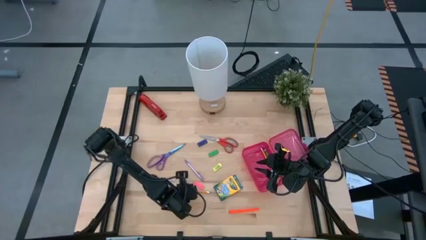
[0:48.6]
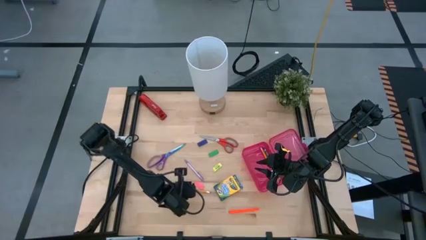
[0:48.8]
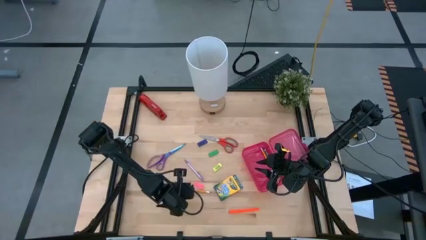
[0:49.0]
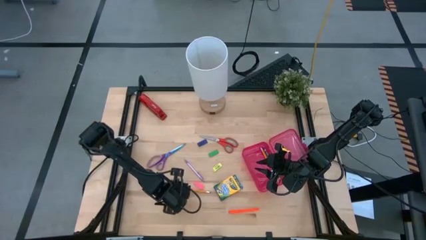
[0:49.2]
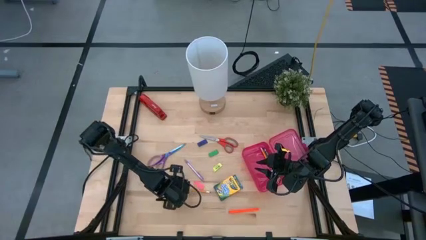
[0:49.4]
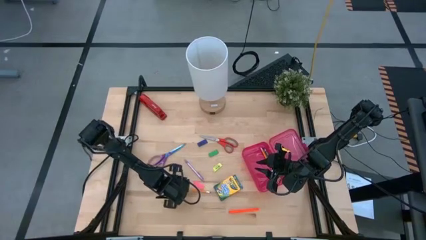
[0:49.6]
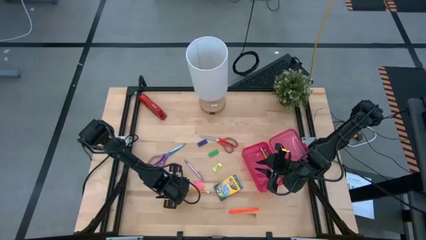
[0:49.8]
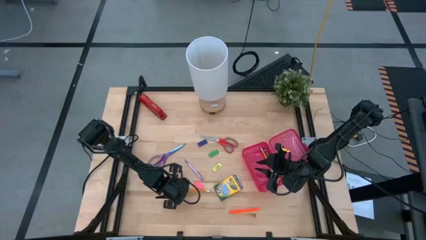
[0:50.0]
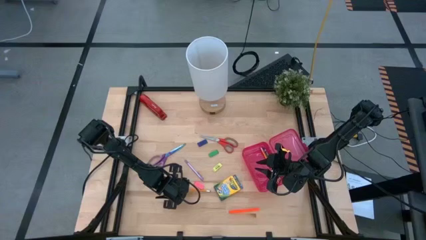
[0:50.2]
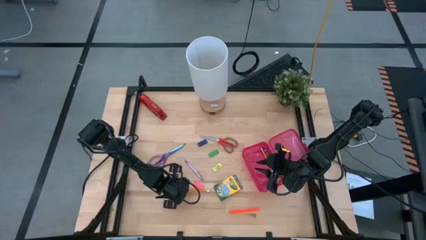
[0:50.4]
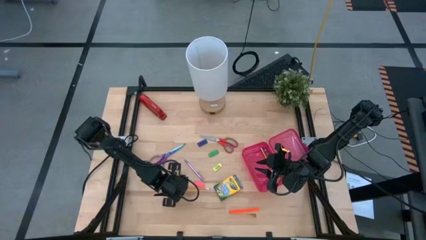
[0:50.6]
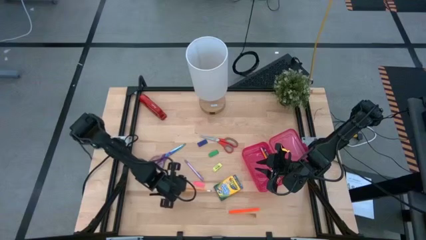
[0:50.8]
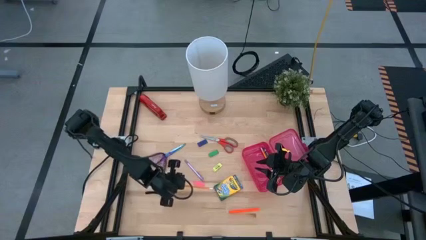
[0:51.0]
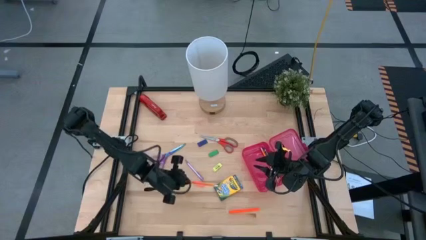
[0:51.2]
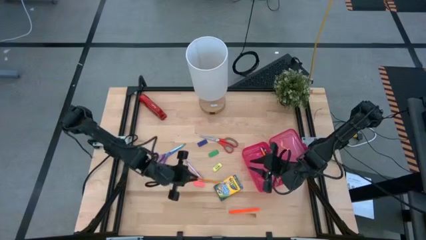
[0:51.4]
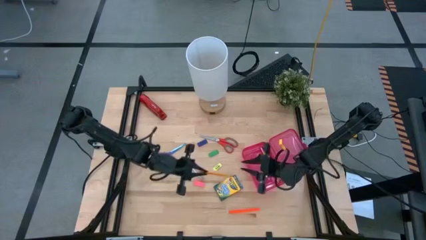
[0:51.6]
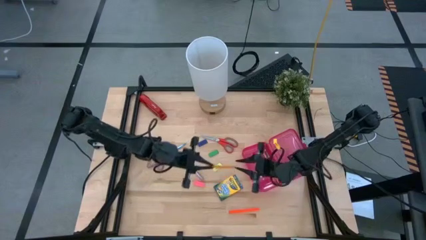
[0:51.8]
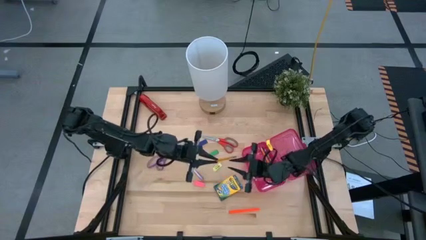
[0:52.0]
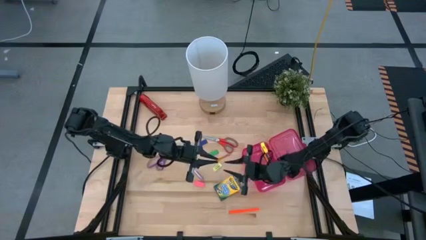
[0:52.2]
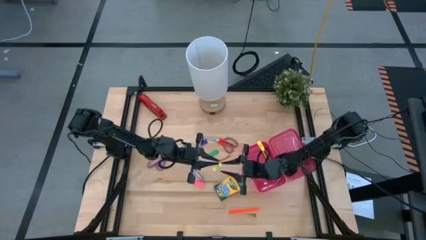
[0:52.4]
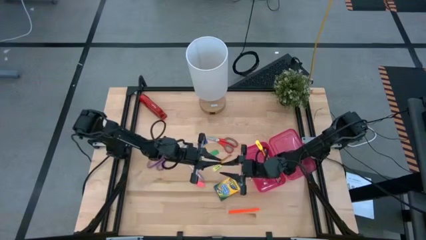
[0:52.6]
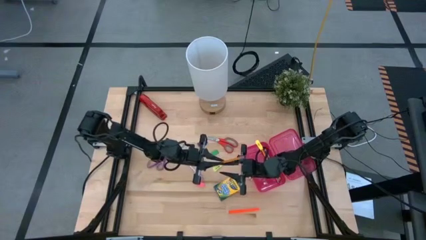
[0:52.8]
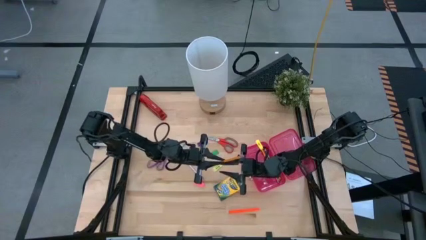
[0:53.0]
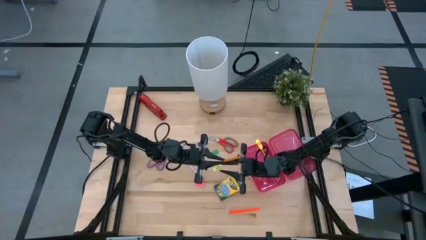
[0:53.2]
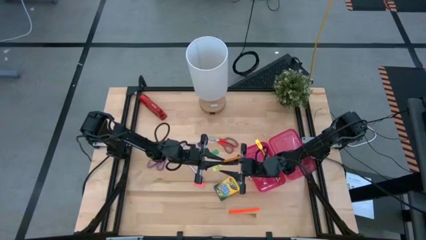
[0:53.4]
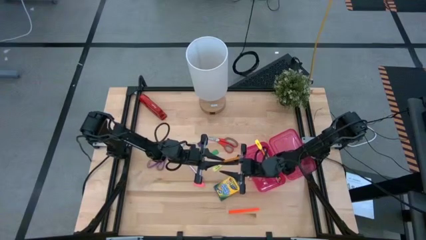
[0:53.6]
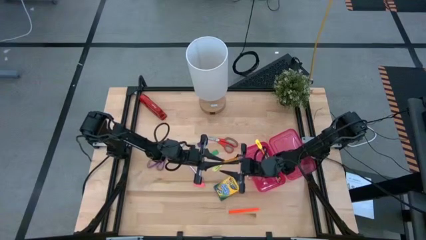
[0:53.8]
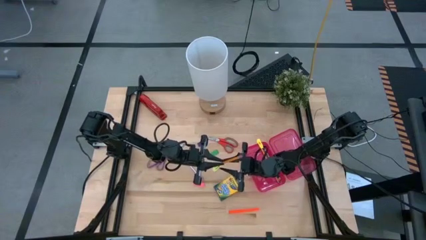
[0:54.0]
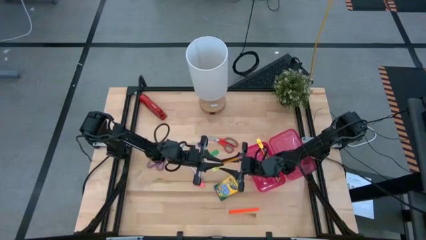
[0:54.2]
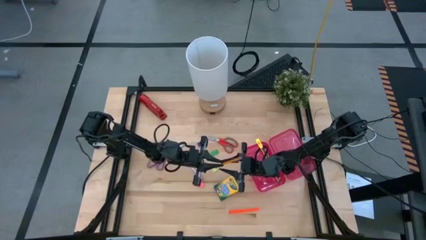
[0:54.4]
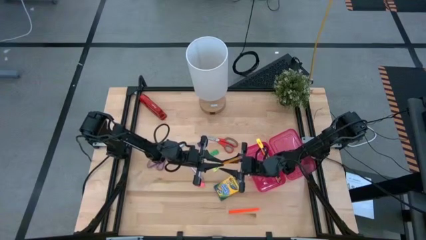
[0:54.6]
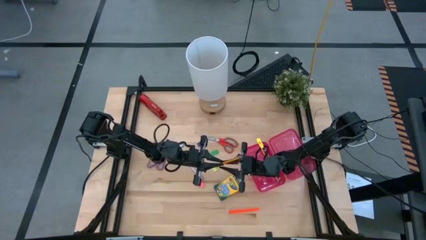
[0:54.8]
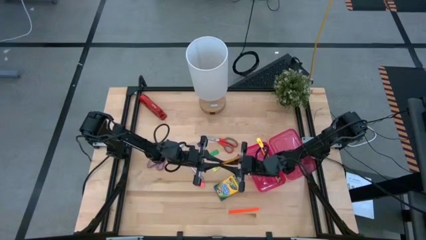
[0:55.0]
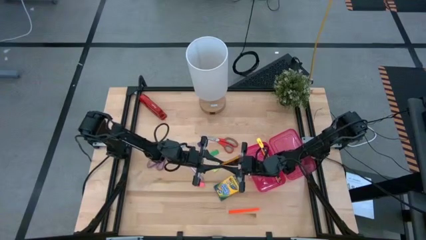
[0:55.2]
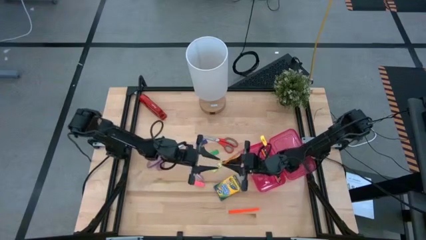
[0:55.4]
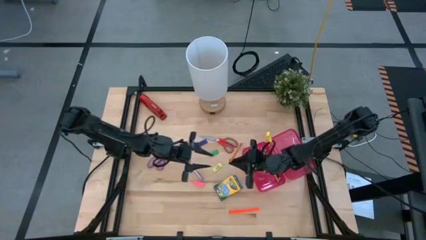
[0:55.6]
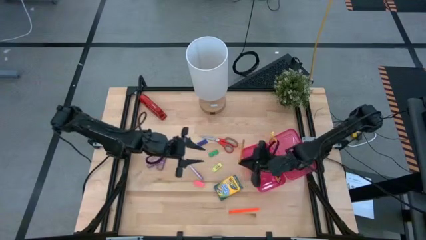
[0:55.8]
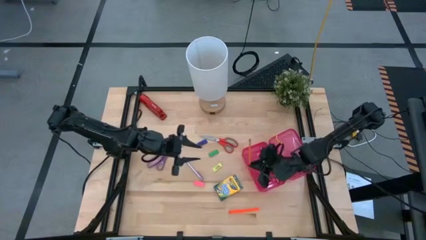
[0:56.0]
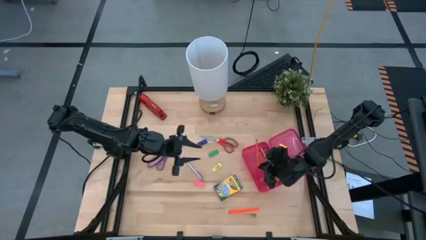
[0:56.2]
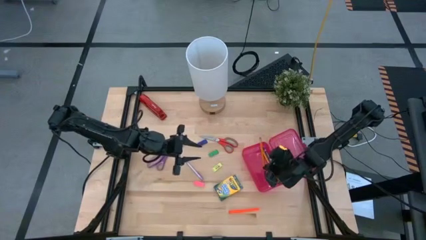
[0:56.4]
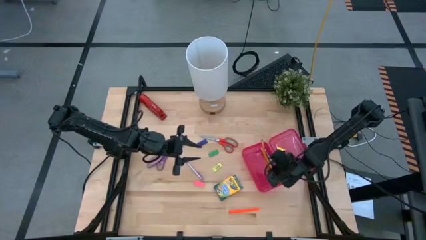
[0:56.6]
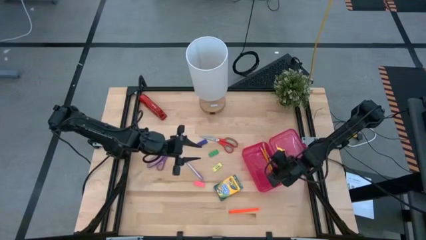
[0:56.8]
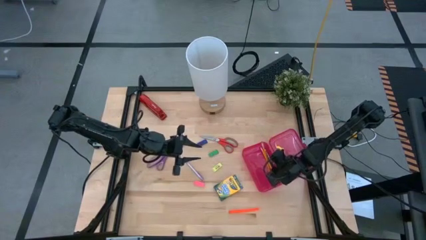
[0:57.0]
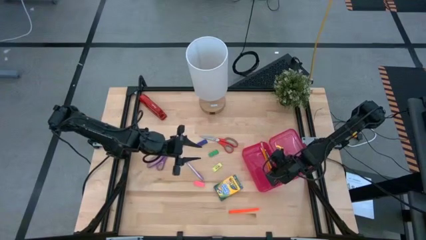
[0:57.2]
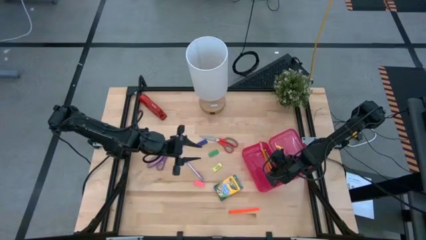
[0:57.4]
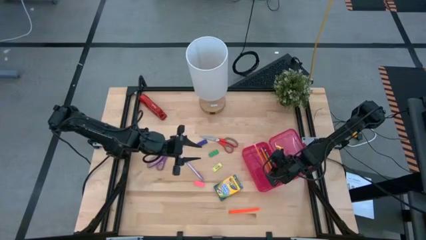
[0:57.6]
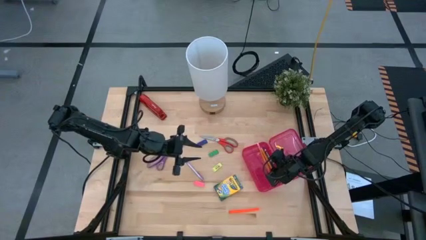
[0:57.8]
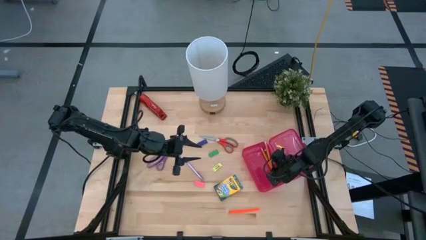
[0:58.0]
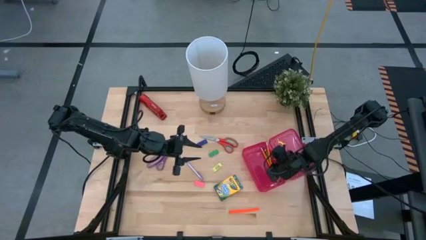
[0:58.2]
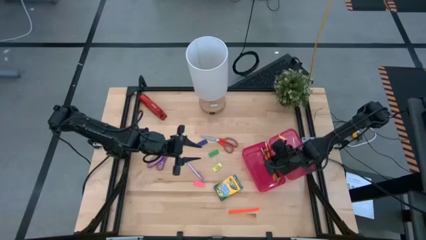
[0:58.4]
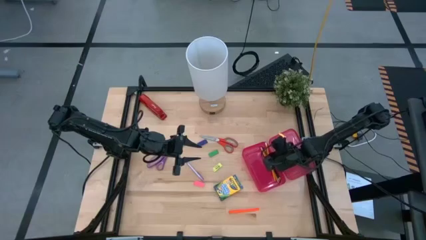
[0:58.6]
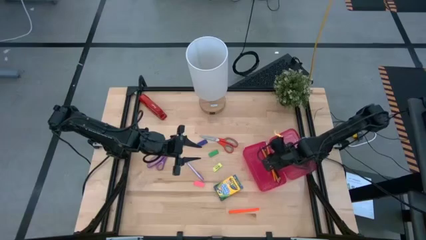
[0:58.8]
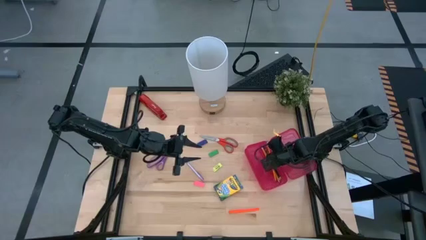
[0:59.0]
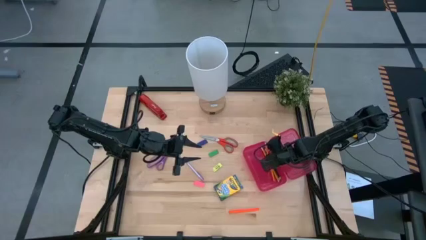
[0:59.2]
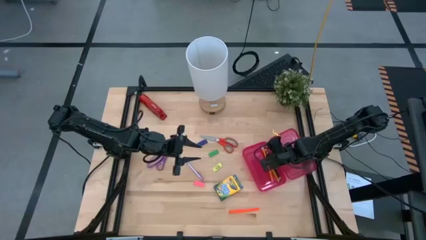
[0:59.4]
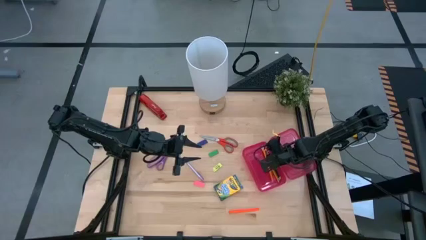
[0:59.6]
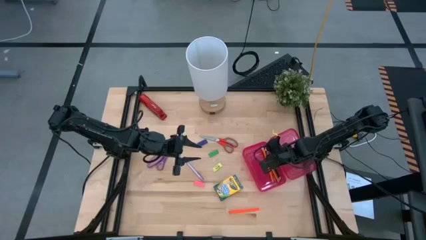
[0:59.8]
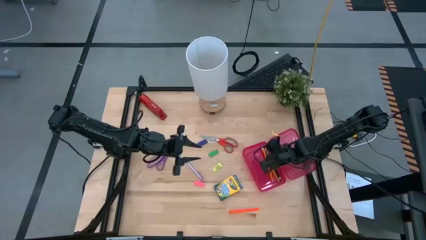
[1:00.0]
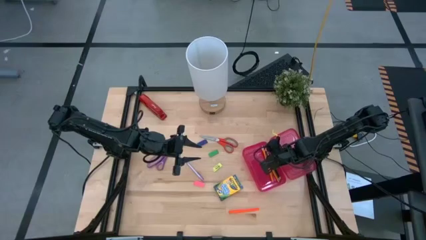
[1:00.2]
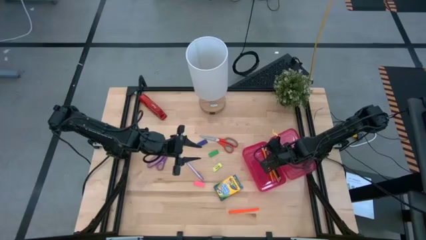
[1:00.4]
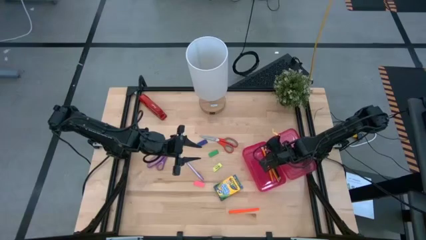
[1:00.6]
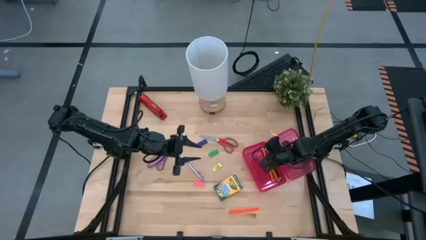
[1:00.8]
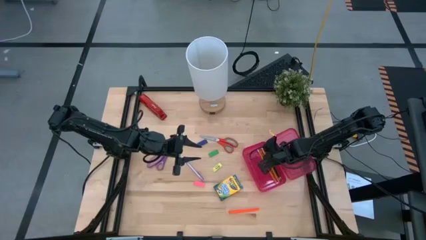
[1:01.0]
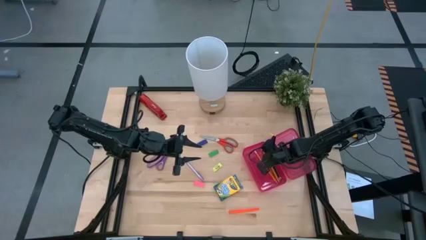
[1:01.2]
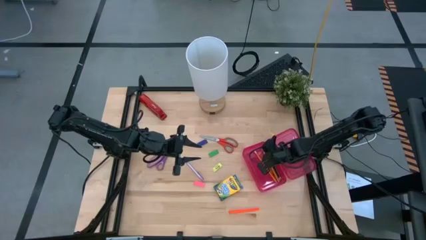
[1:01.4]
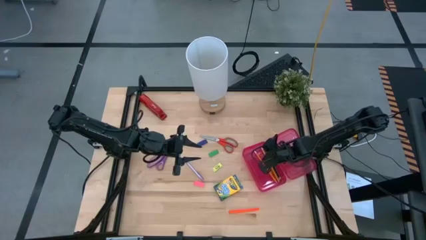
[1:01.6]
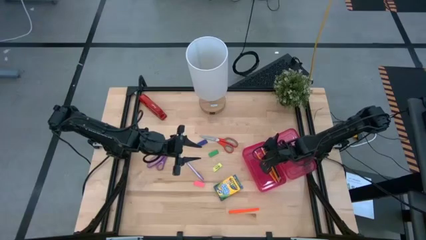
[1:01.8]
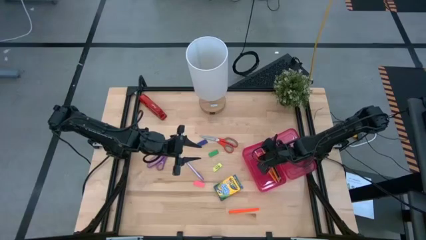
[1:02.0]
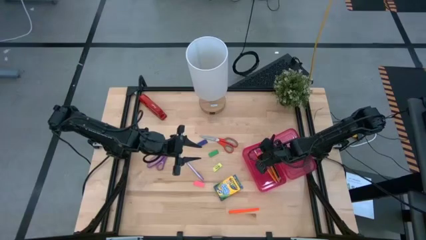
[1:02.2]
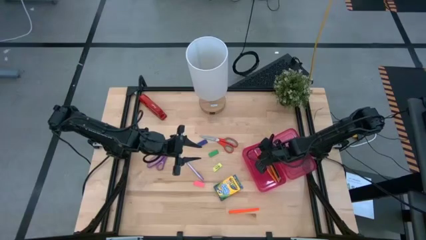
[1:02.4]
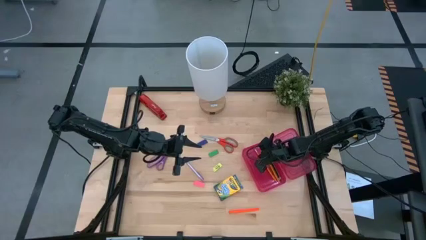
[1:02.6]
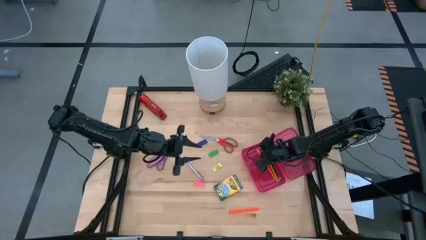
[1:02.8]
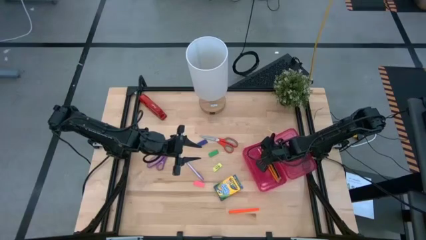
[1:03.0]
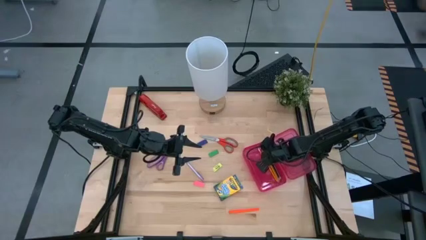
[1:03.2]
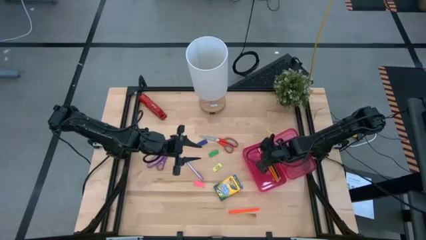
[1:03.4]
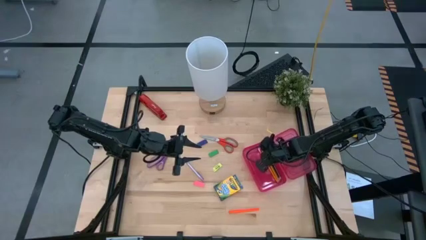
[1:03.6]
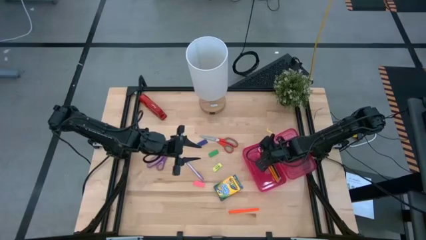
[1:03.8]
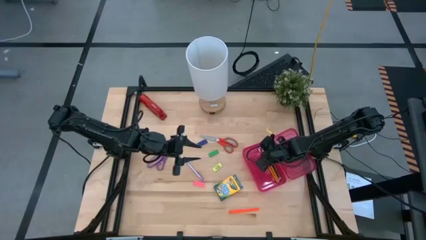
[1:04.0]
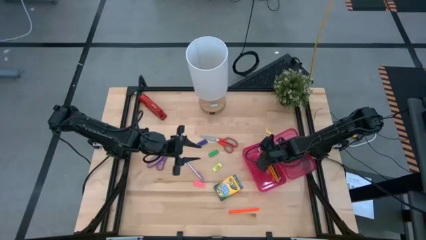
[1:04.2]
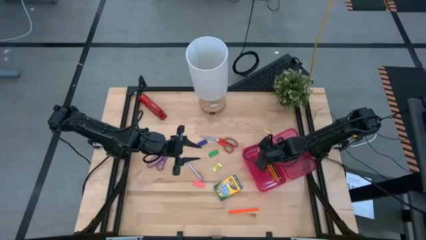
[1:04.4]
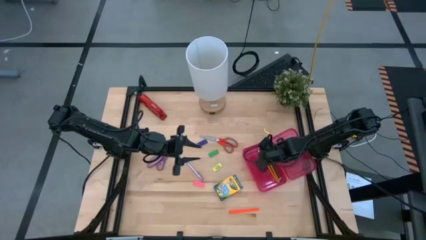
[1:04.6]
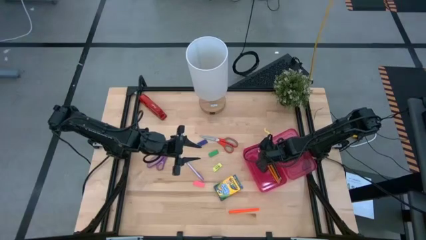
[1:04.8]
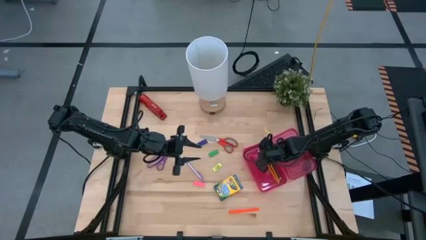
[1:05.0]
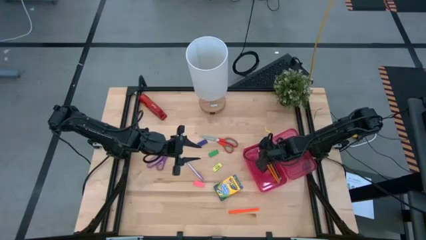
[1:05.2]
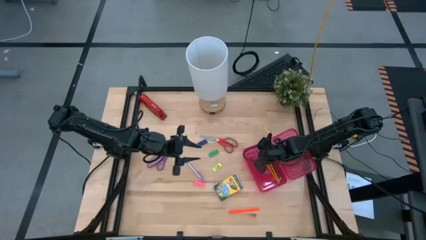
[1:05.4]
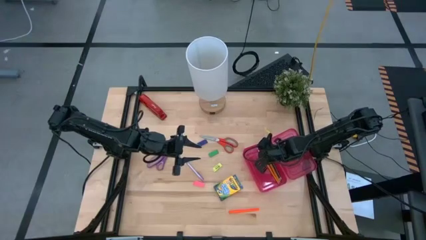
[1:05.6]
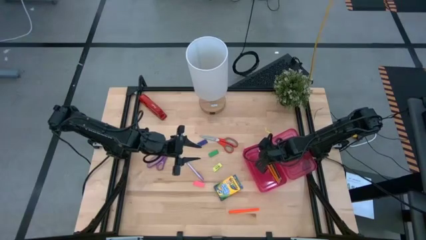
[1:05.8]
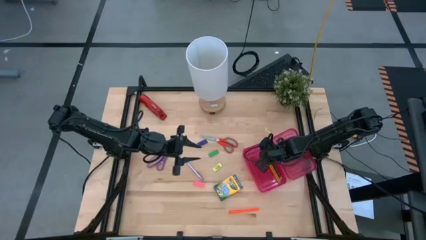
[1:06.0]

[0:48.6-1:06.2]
Task: Pack school essentials
Put the yellow pencil into the pink supply box
